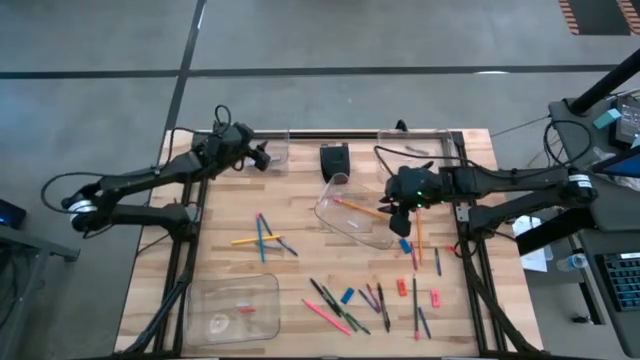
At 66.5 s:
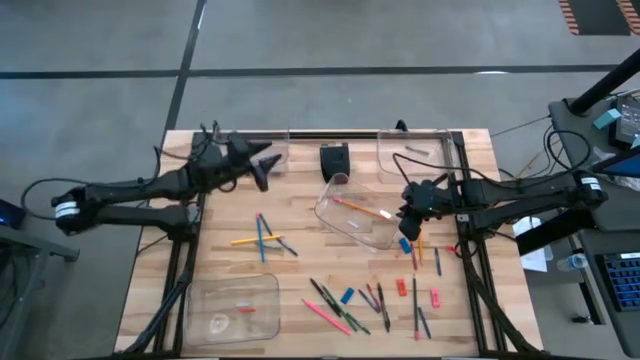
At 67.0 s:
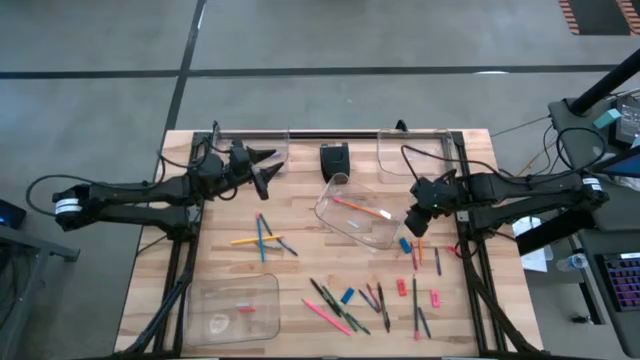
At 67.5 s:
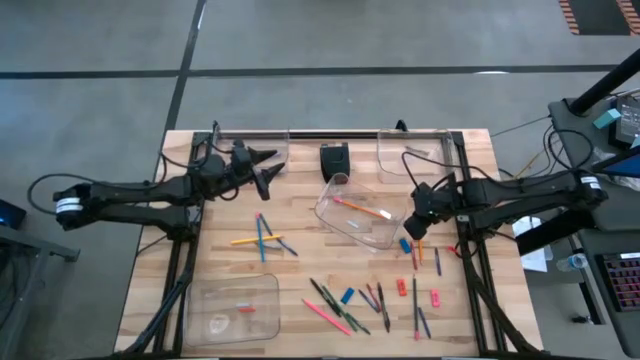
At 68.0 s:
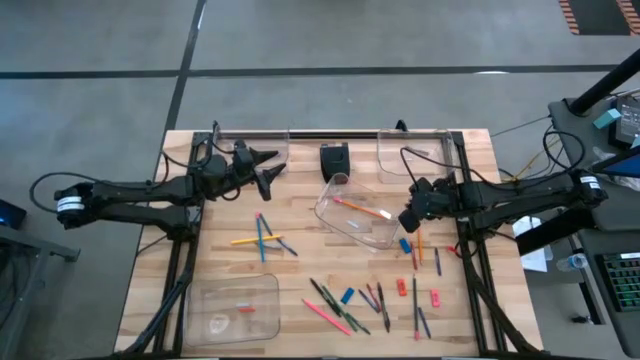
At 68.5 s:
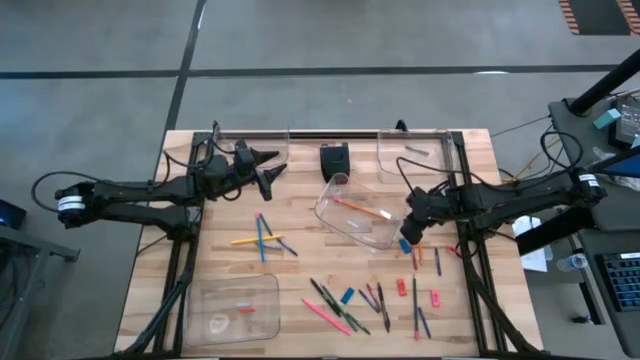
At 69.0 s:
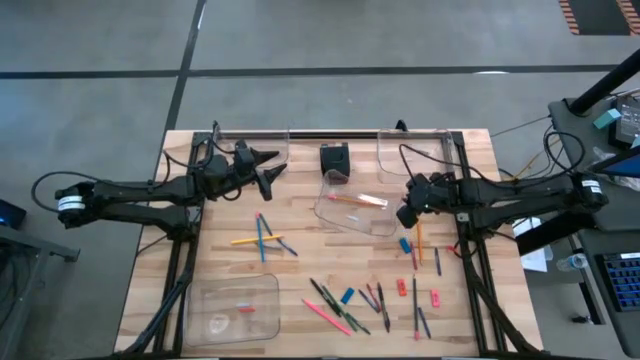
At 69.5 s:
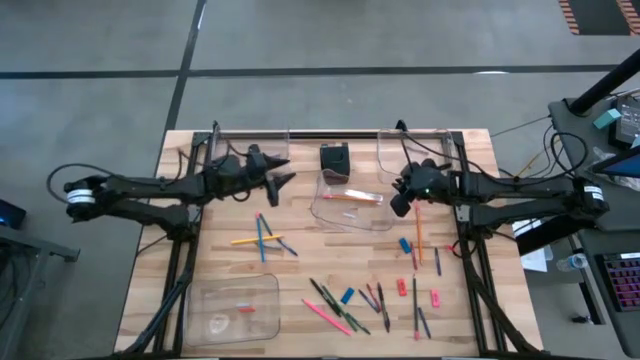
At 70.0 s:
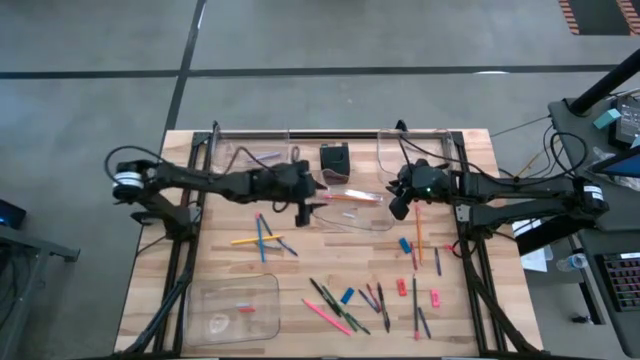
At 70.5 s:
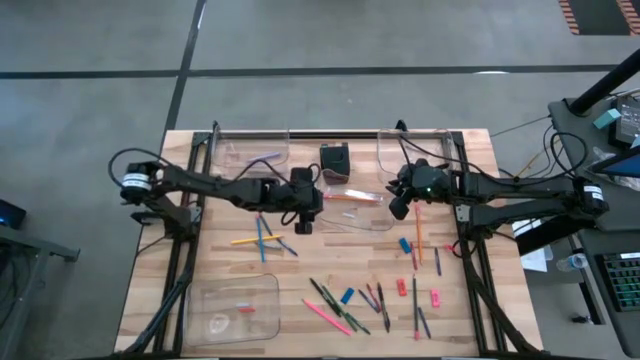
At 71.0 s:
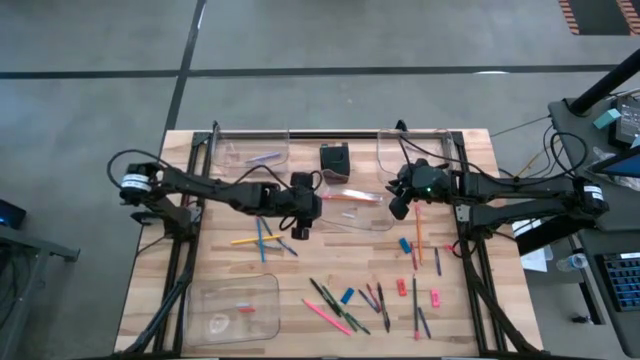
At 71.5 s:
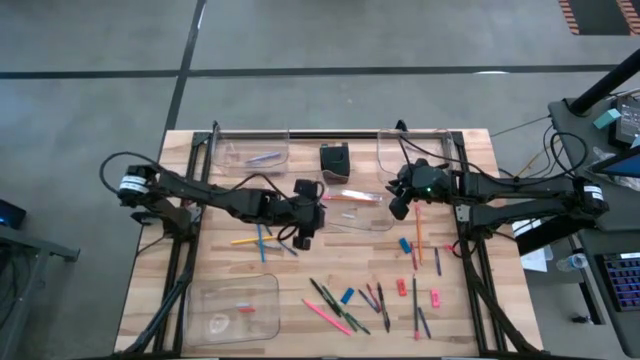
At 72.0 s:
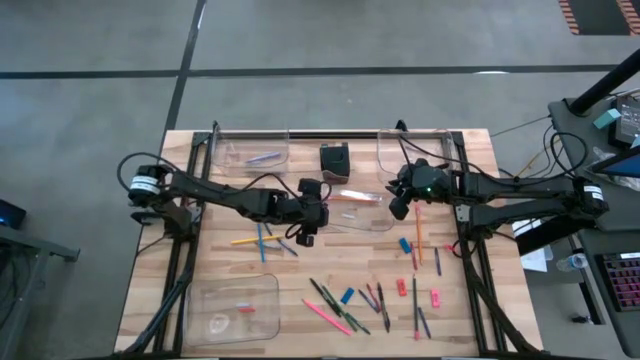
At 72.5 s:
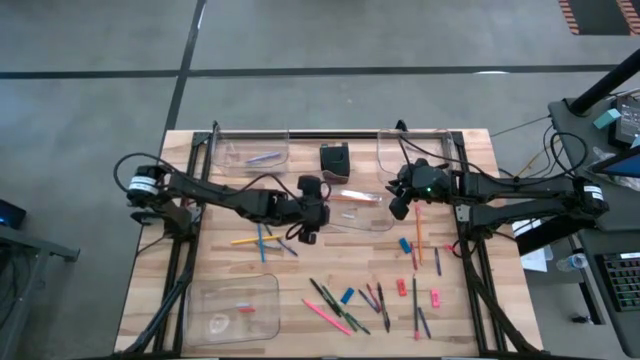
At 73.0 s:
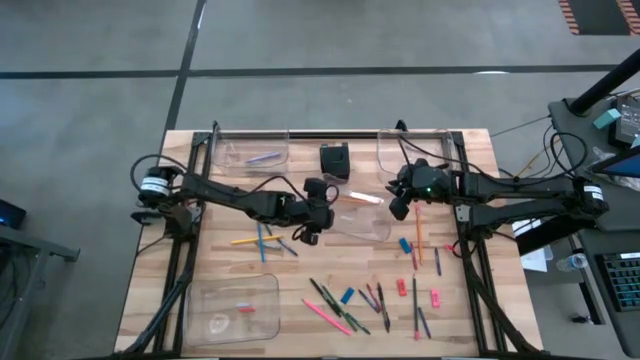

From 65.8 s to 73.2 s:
Task: Sort crayons/erasers/pens/pencils in bins
Adjust the middle transparent bin

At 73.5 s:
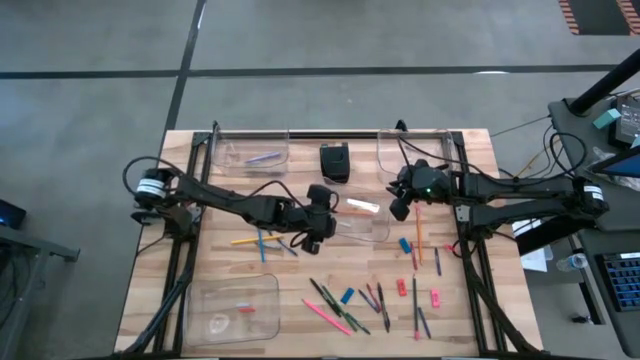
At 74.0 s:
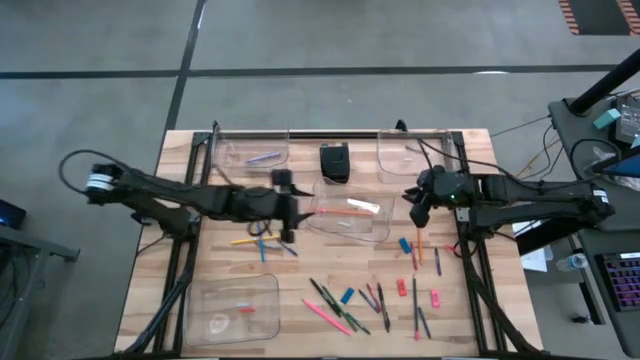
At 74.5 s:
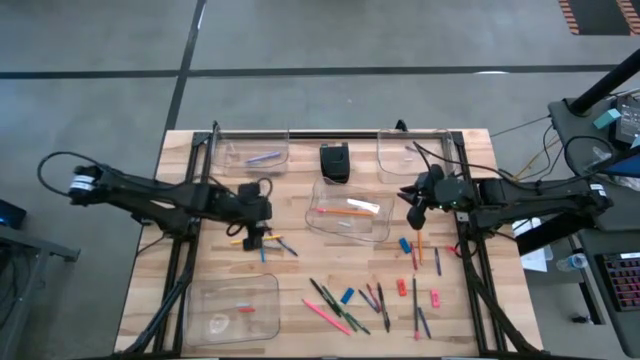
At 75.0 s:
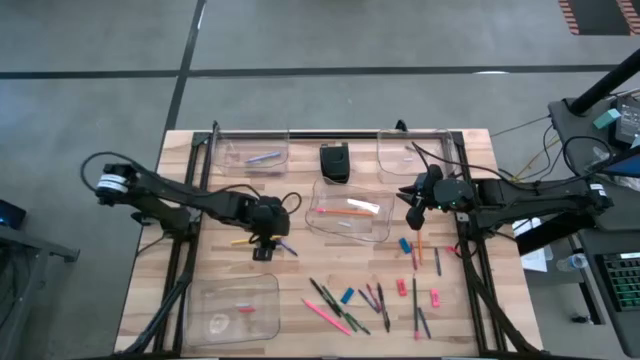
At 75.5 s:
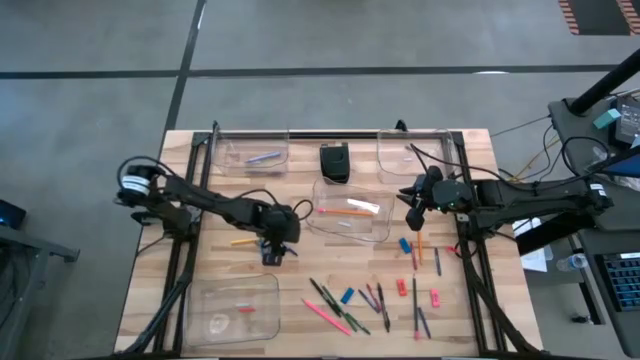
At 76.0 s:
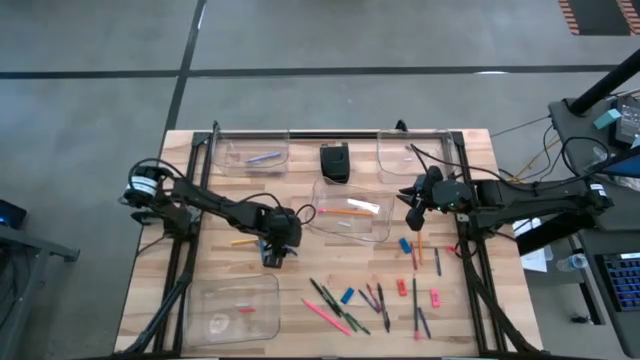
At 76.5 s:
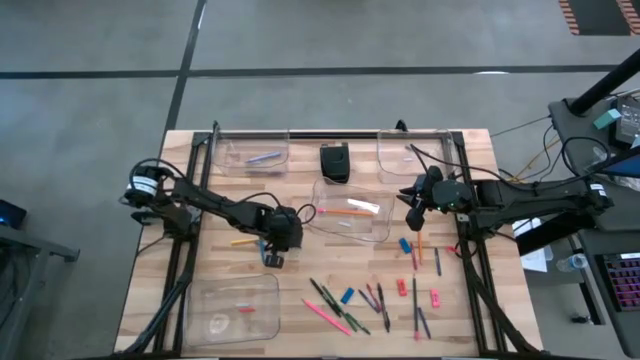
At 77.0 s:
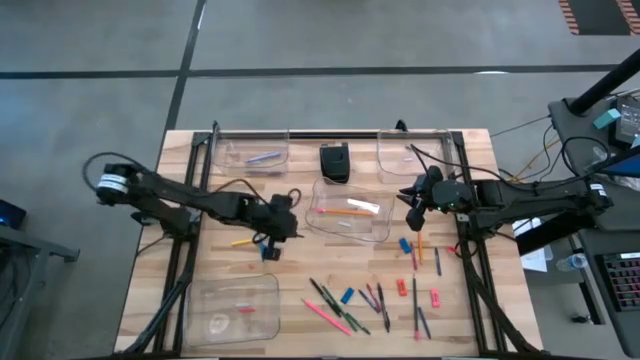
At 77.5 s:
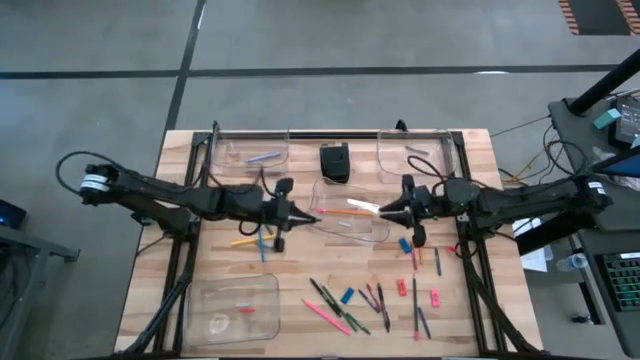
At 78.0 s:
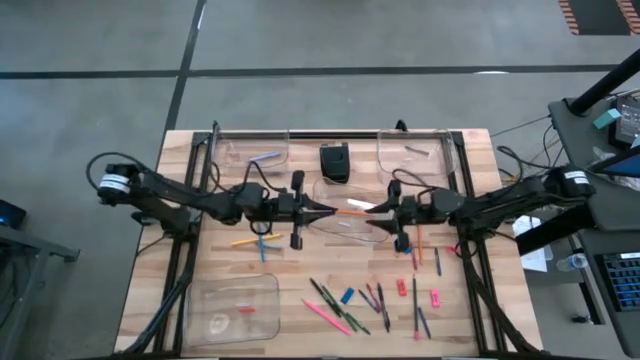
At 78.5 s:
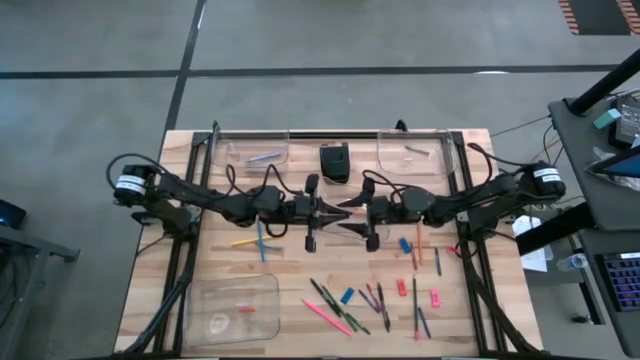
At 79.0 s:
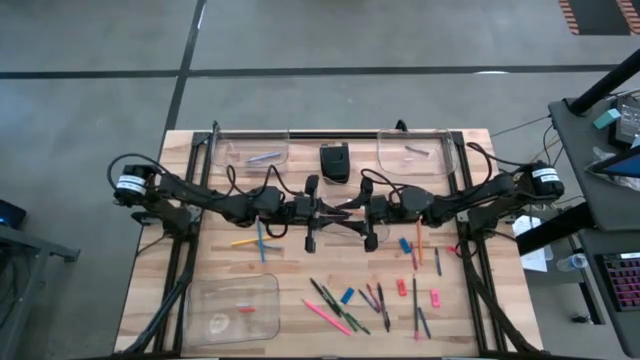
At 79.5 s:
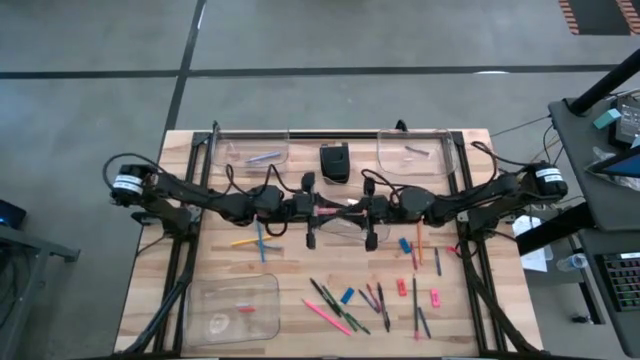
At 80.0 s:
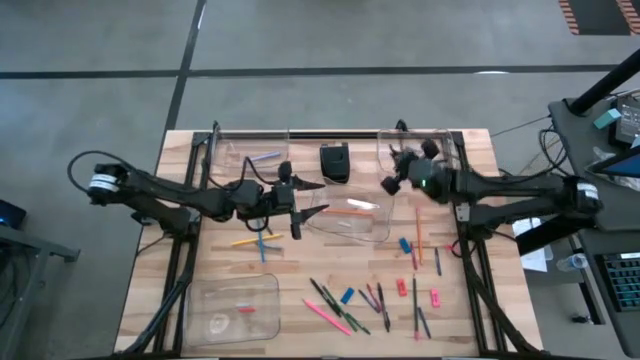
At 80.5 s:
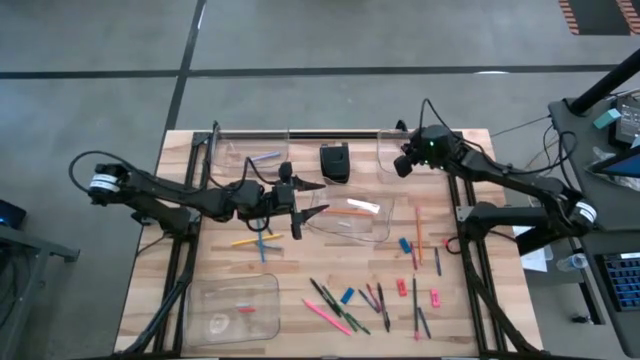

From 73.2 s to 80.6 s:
Put the blue crayon into the top right transparent bin

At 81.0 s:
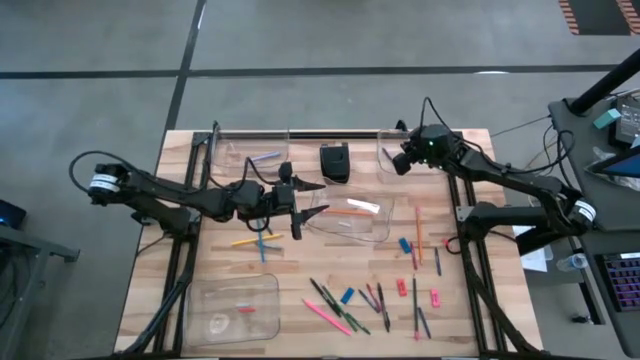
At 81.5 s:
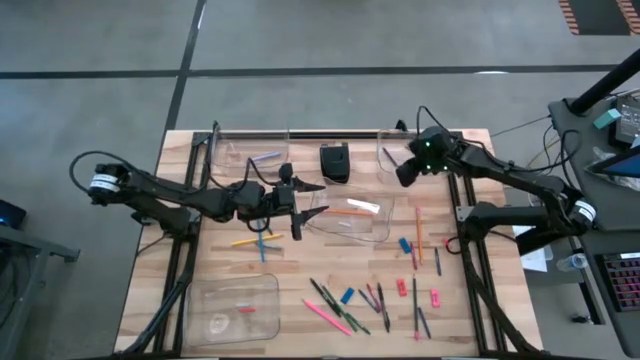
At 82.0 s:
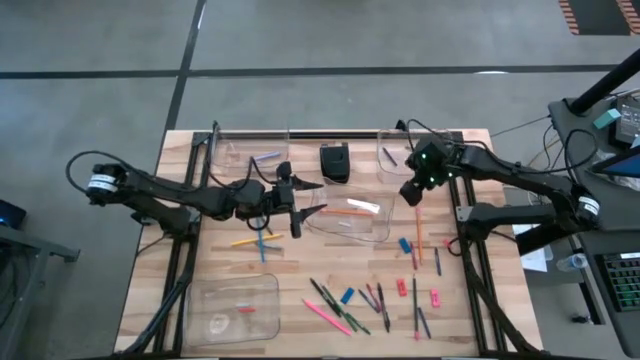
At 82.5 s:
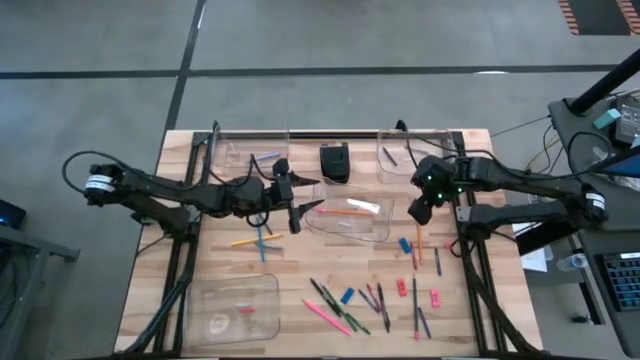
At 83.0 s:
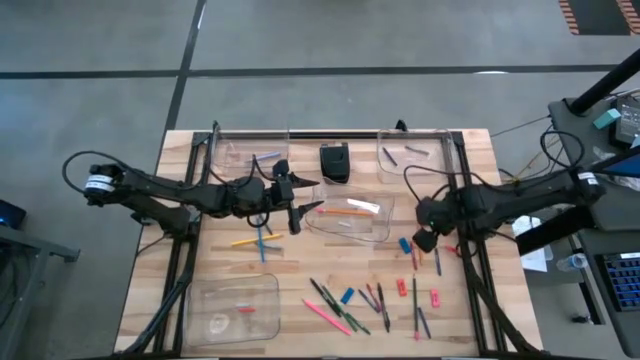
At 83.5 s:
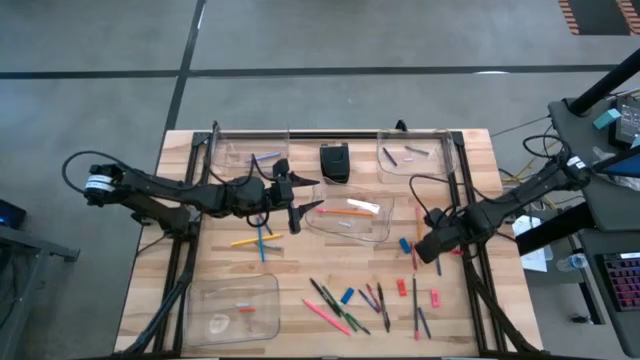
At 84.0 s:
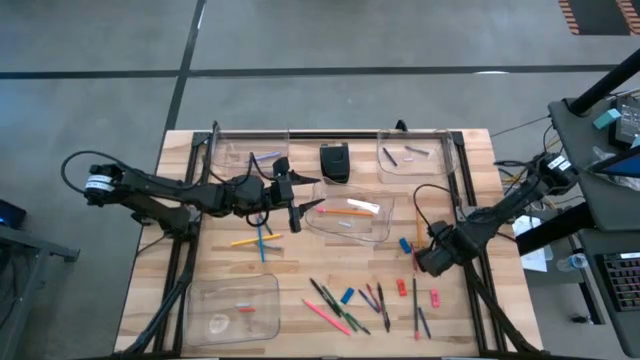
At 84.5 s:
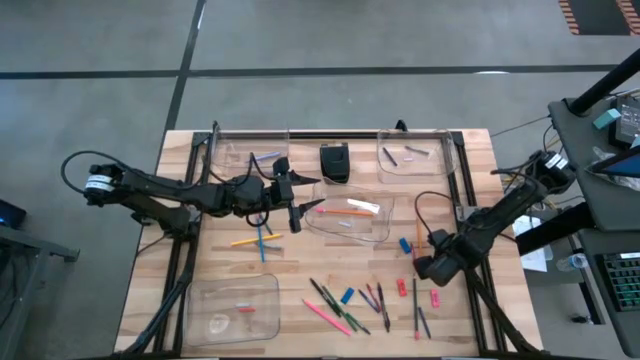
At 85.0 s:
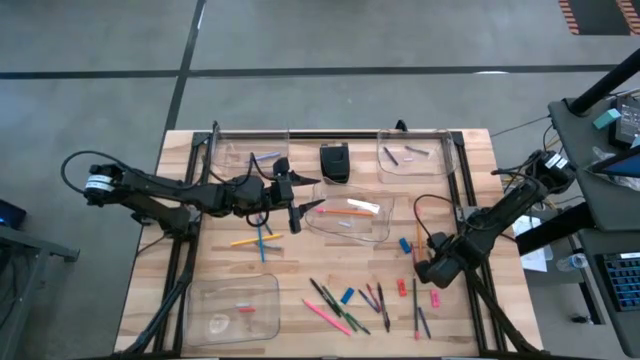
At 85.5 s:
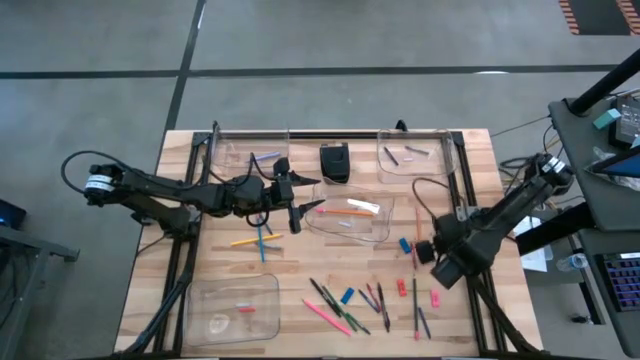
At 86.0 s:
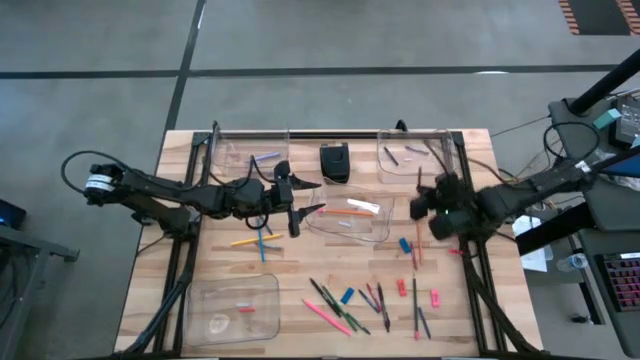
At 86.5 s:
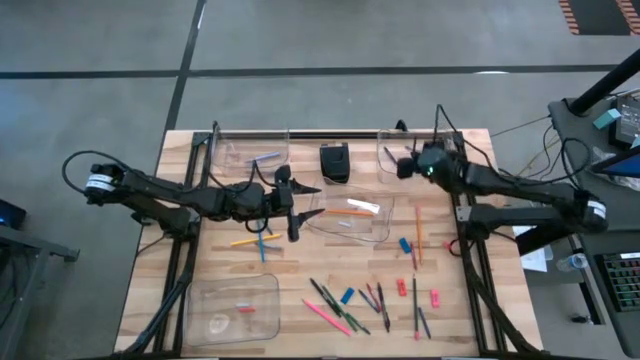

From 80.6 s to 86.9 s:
Put the blue crayon into the top right transparent bin
